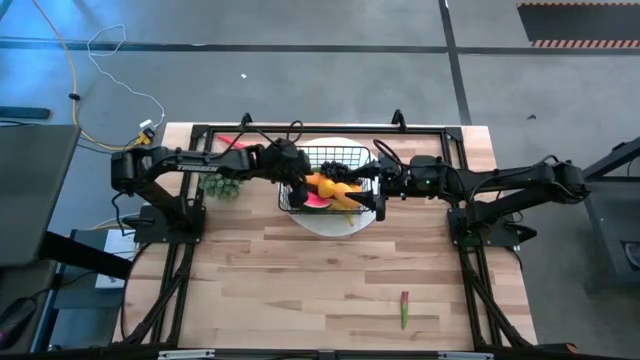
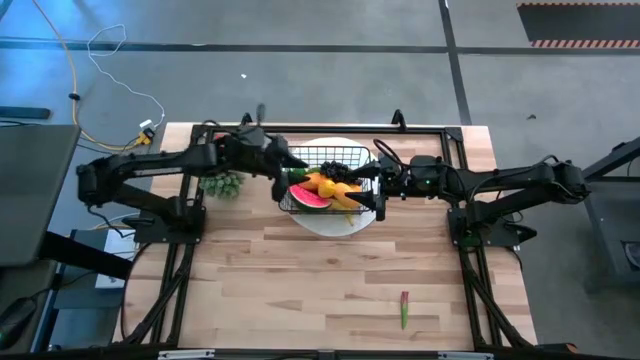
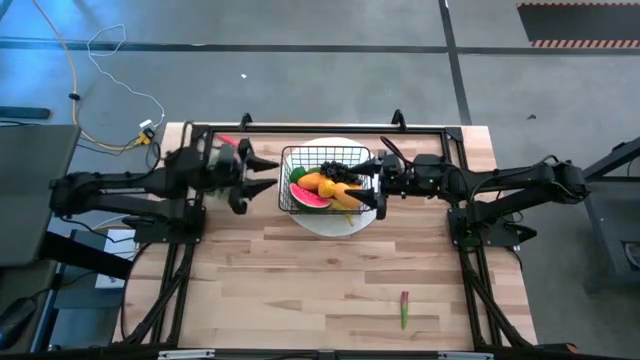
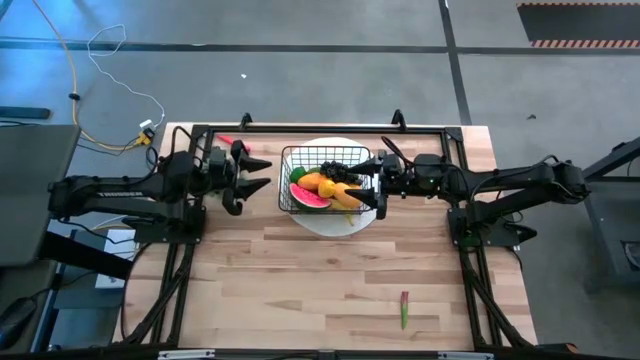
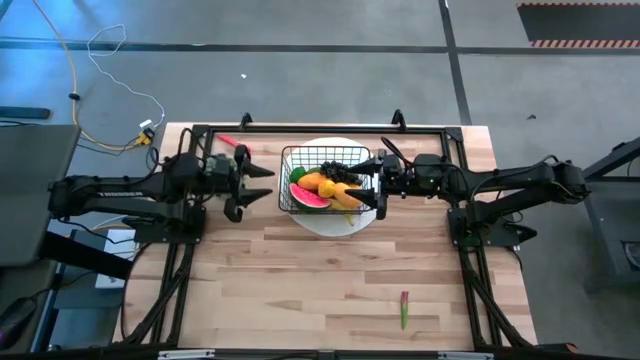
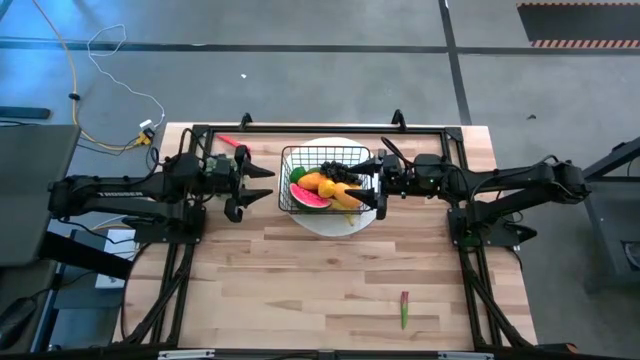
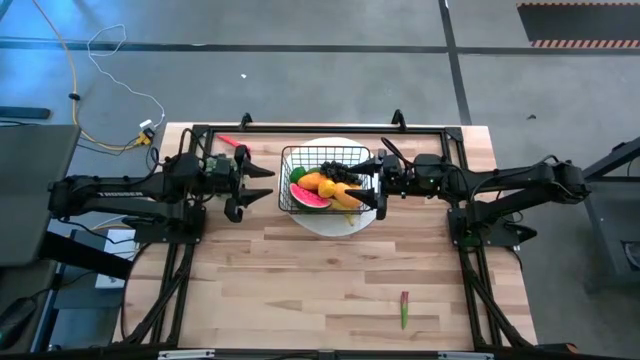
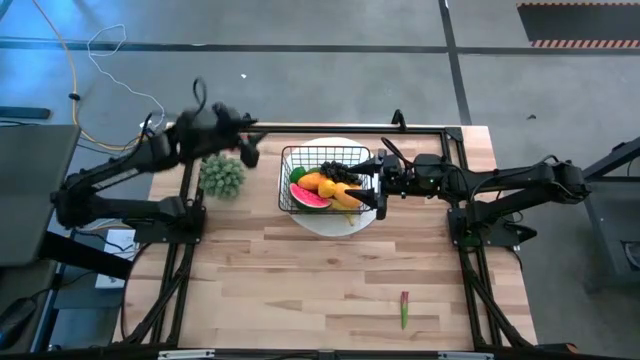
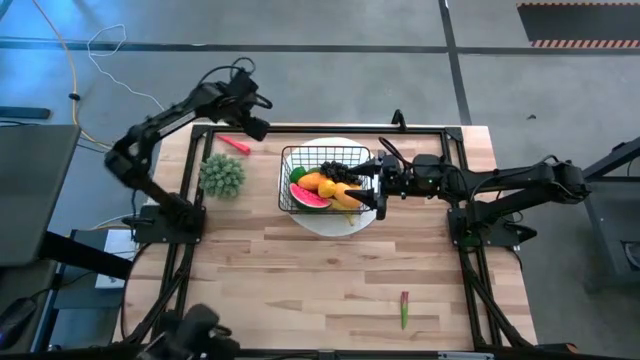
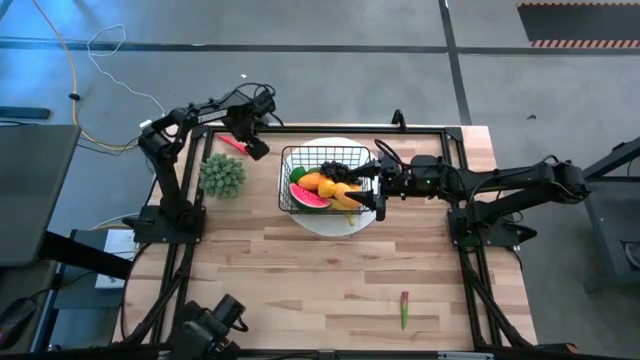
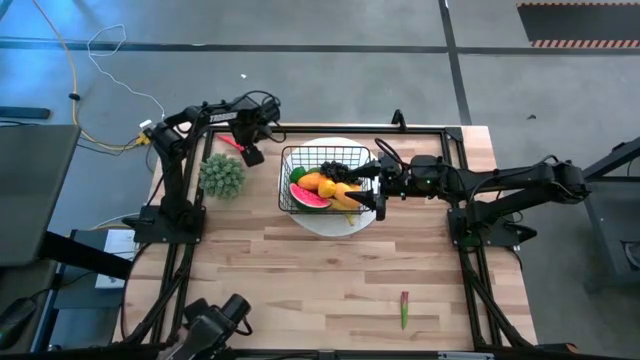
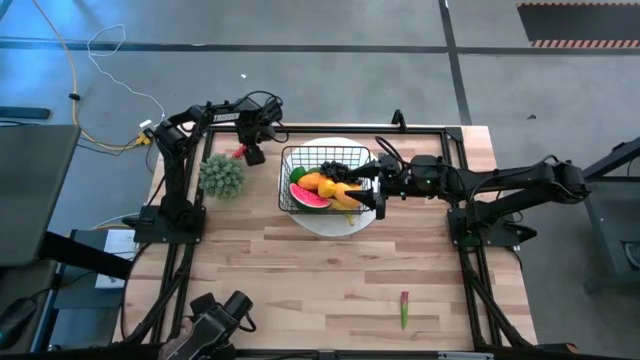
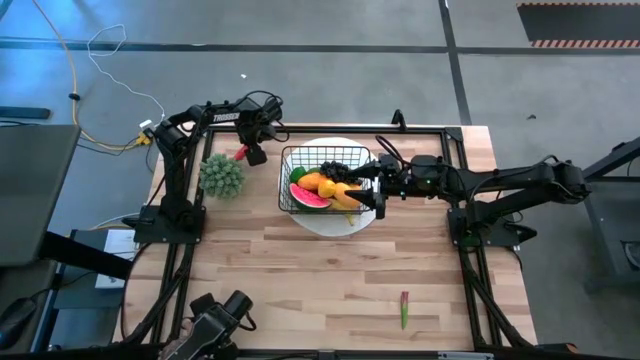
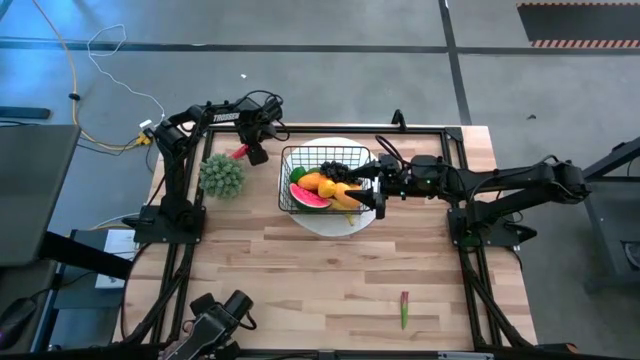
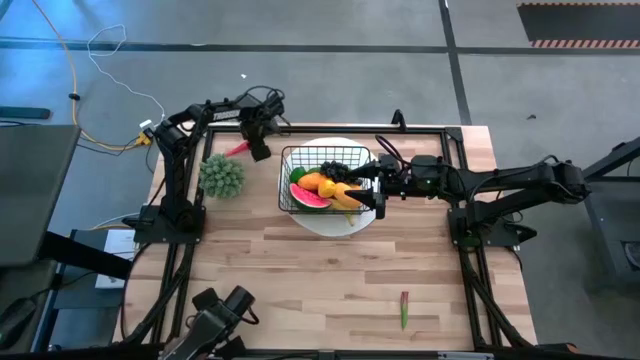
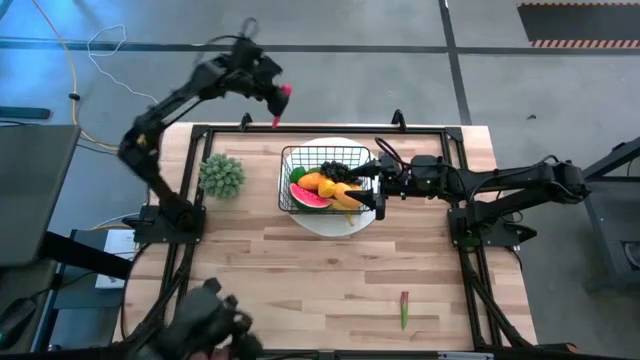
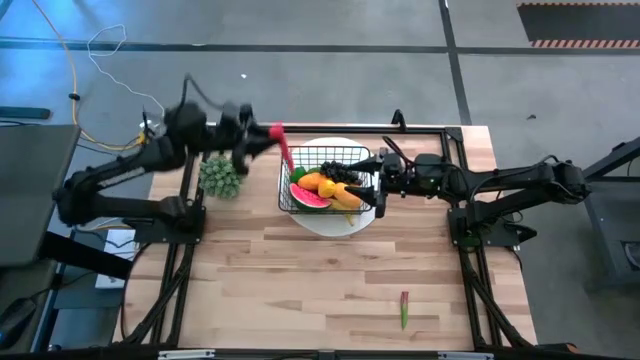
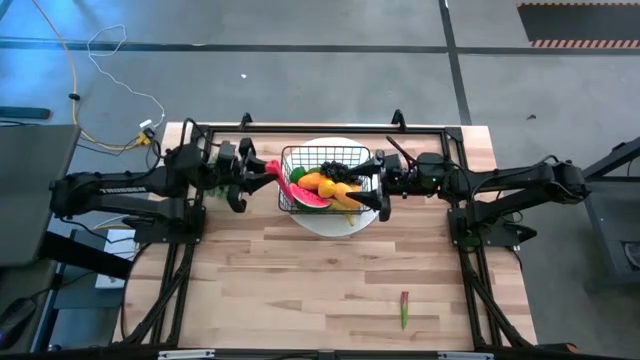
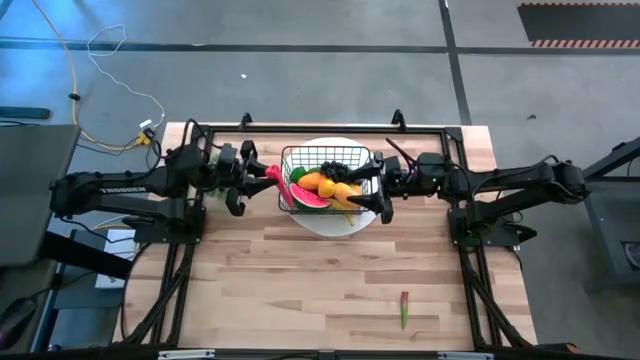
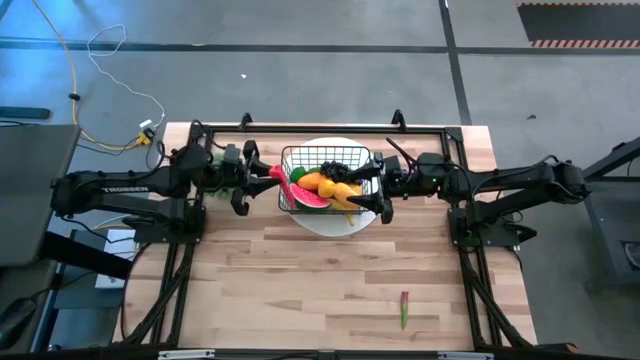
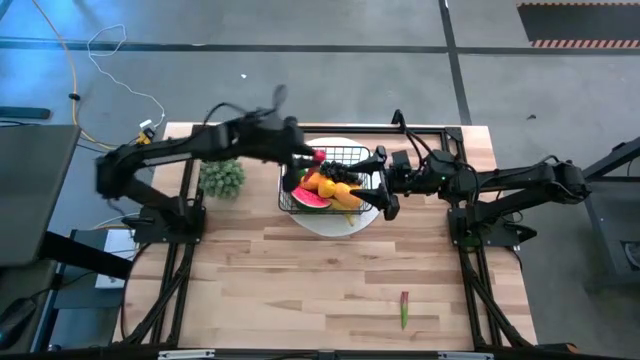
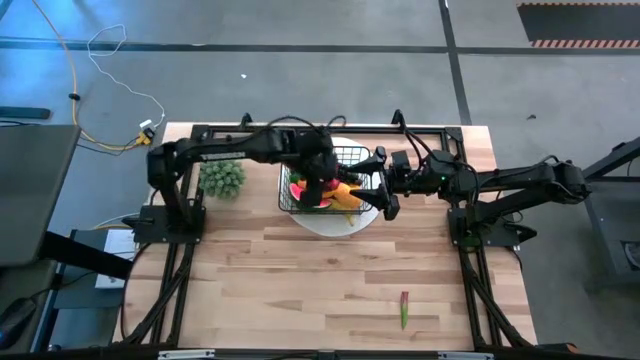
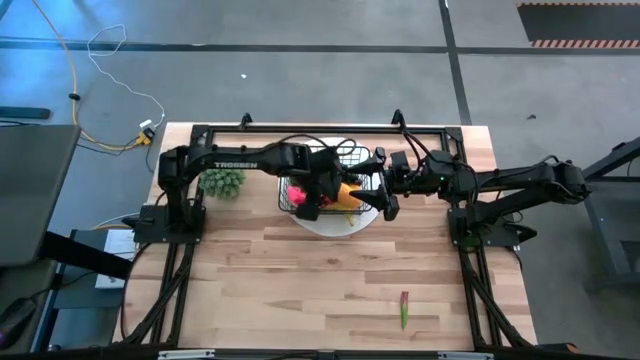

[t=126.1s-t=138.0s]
Task: Build produce basket
Put the orange chili pepper into the wire basket

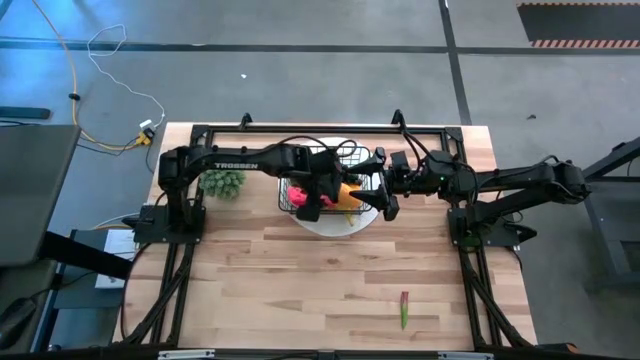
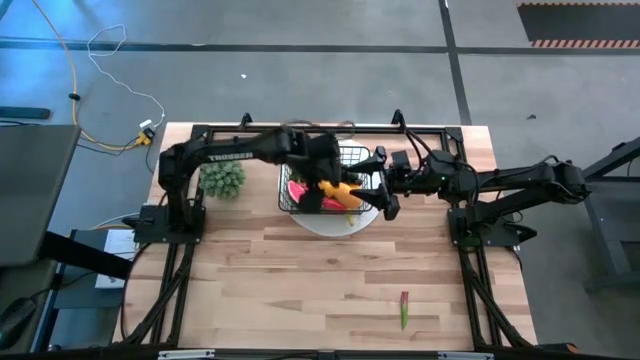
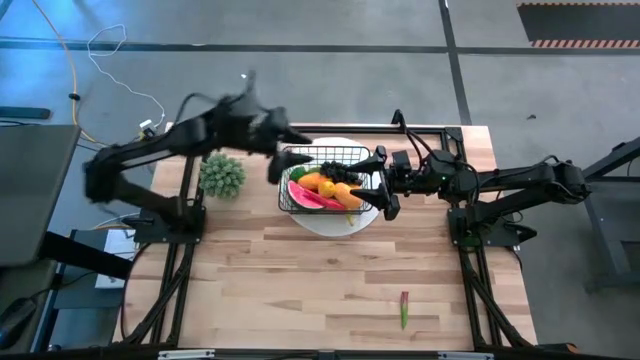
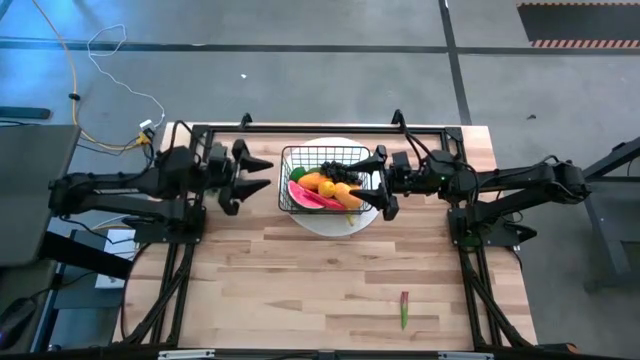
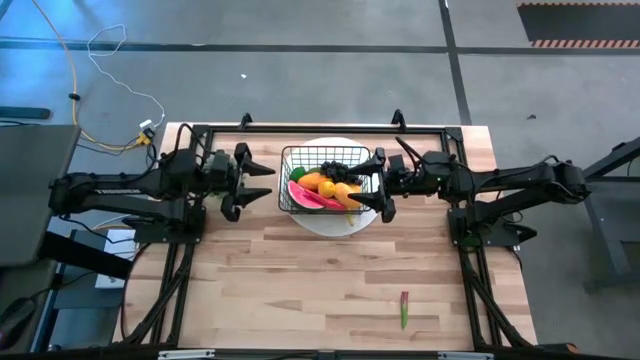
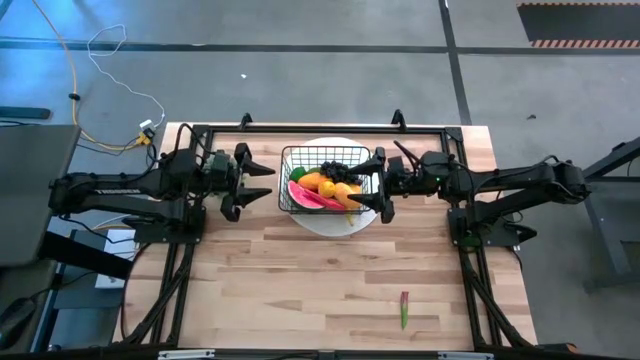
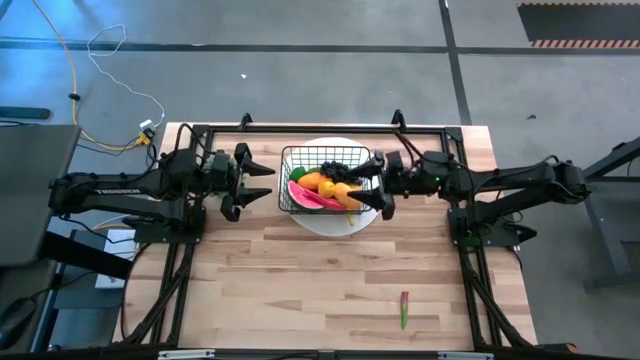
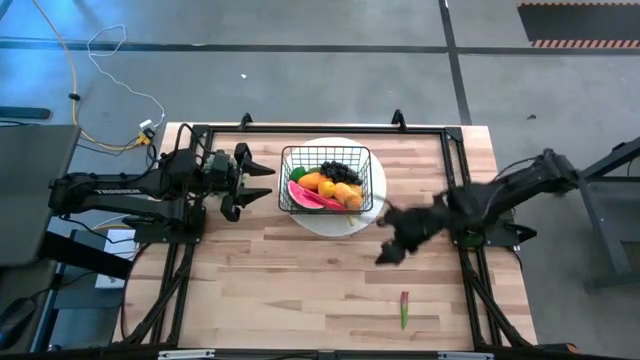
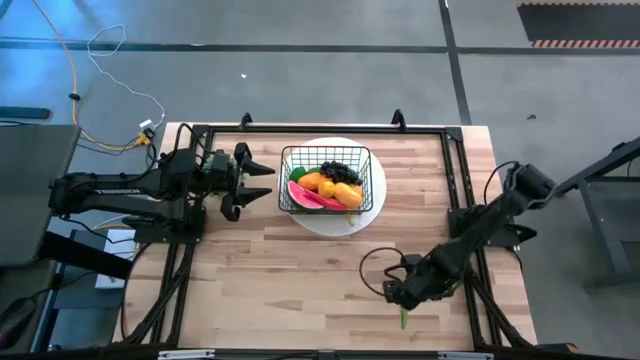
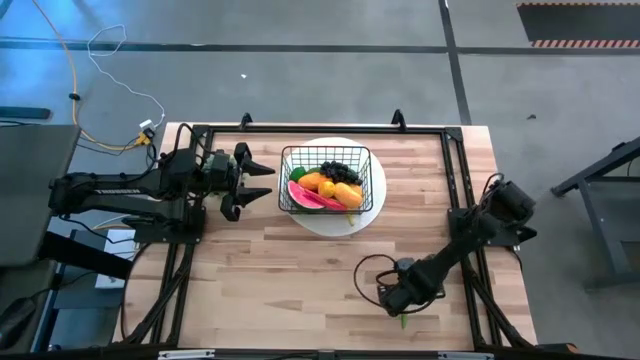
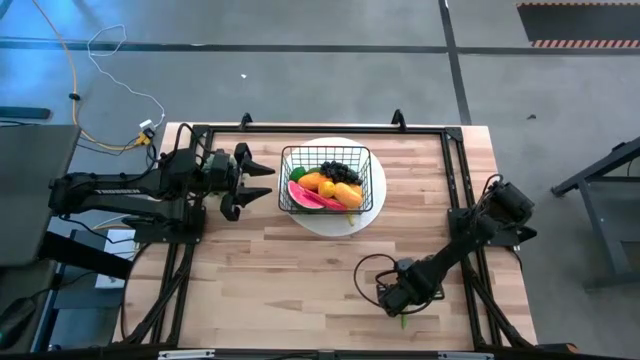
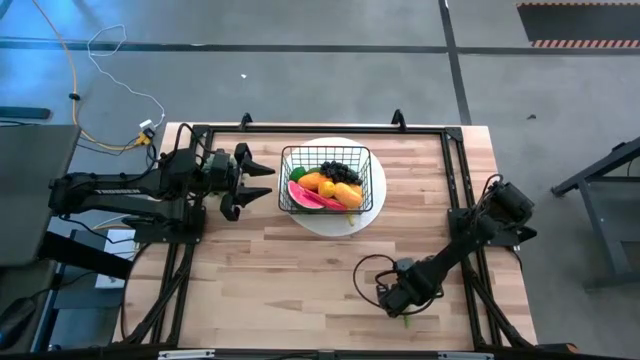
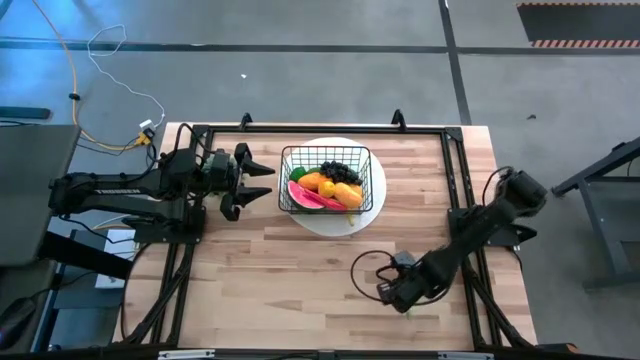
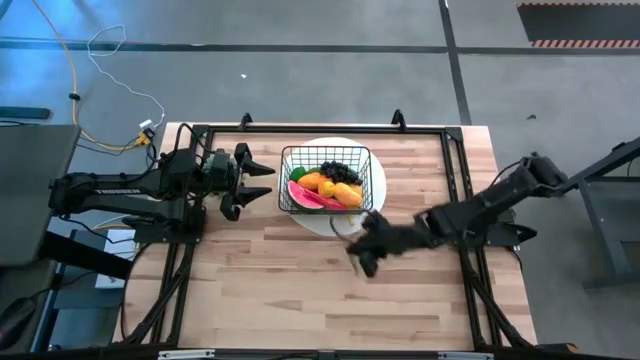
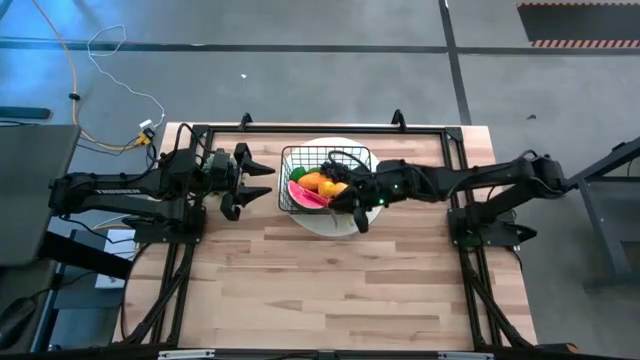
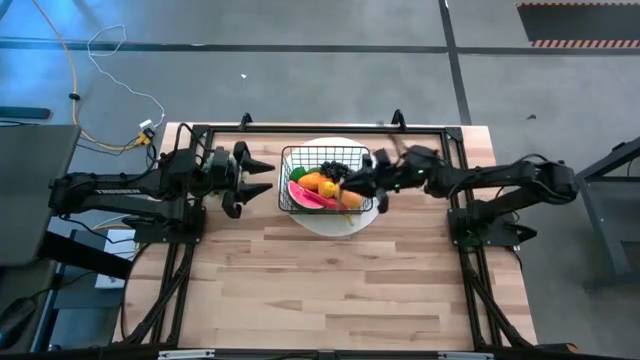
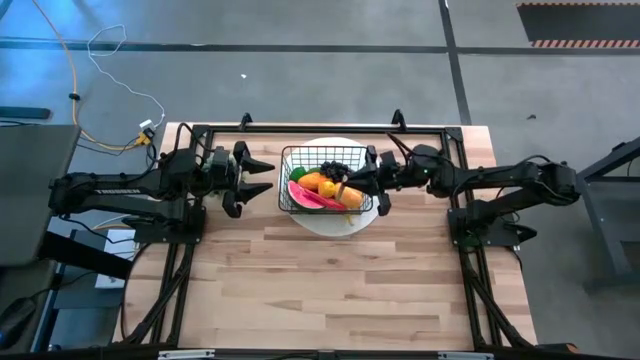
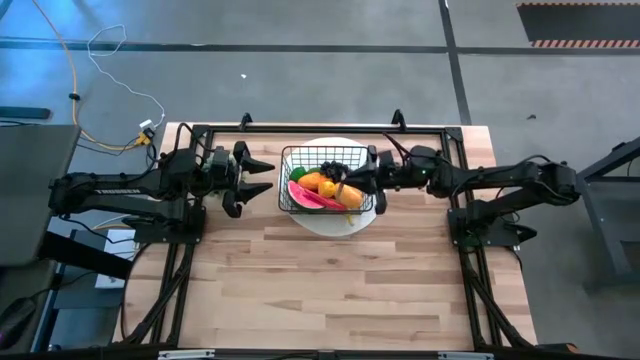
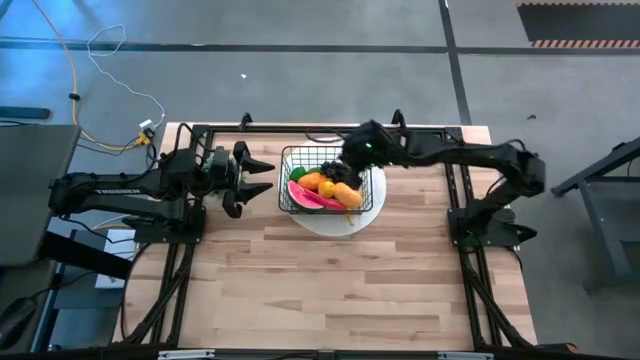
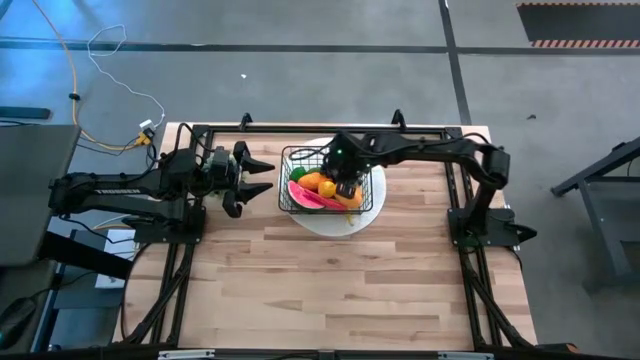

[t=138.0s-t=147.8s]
Put the green dragon fruit leaf into the wire basket
